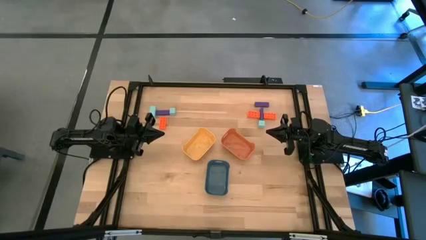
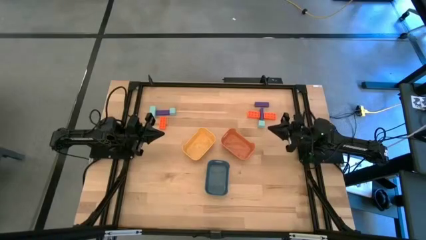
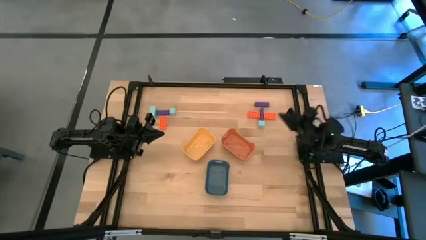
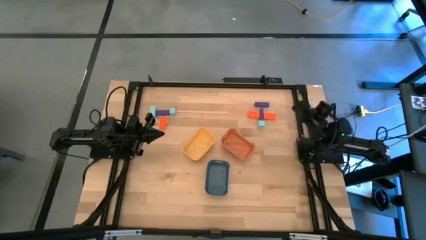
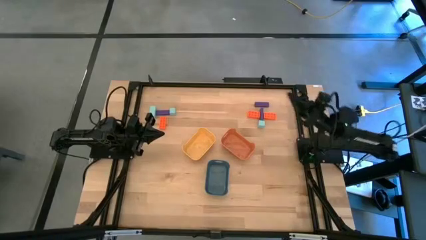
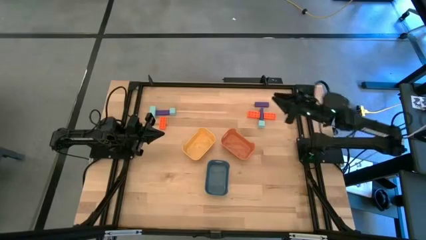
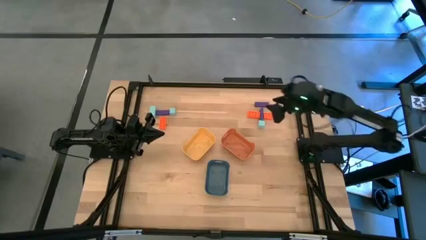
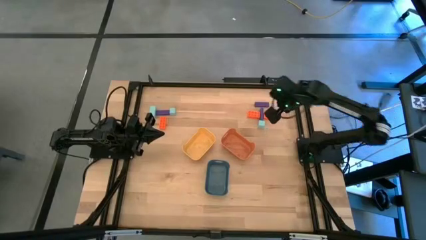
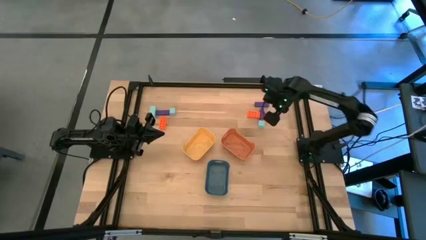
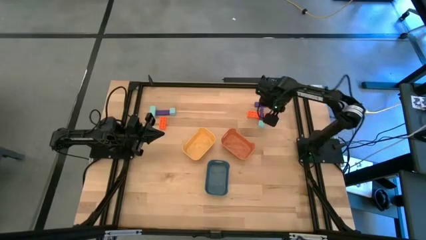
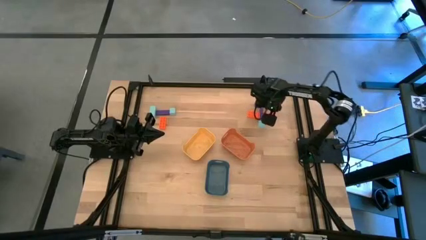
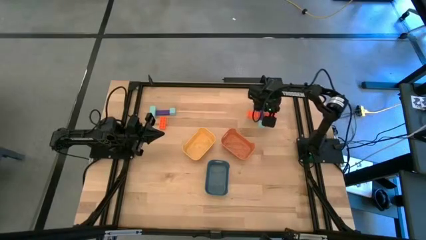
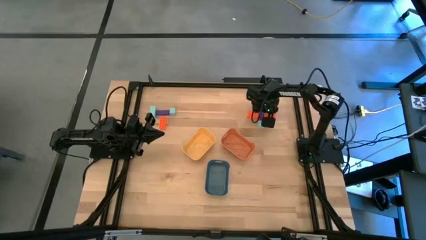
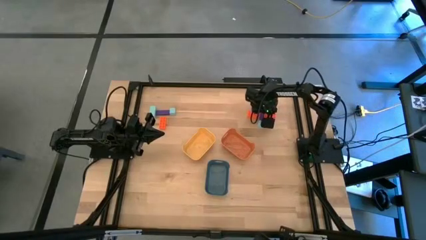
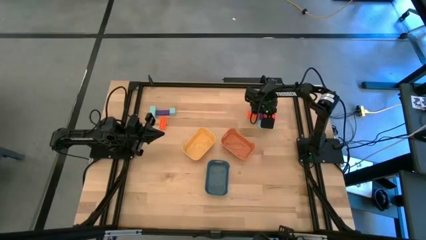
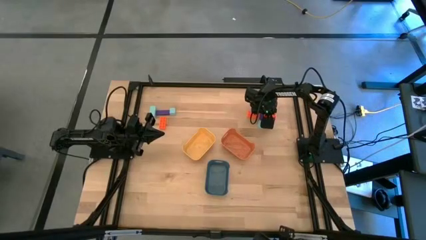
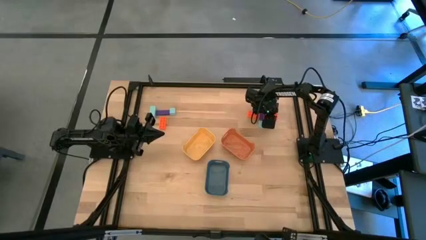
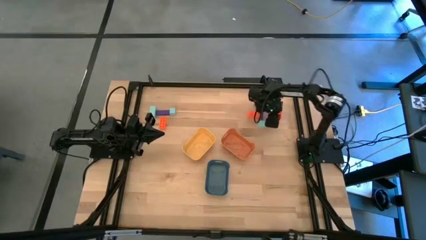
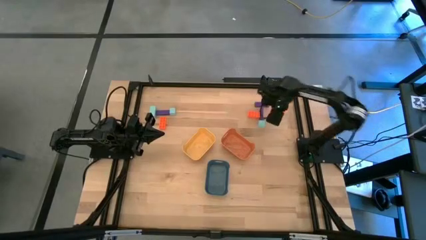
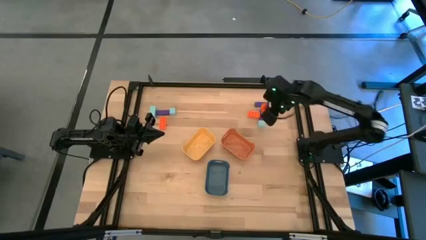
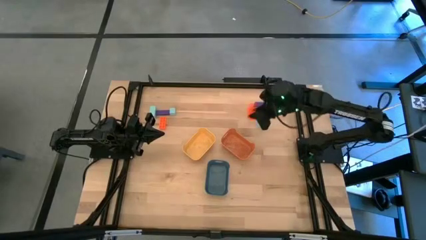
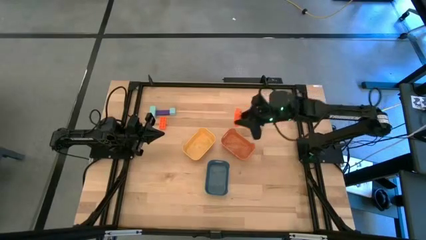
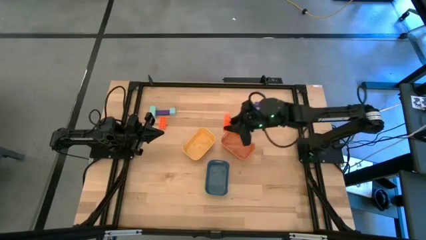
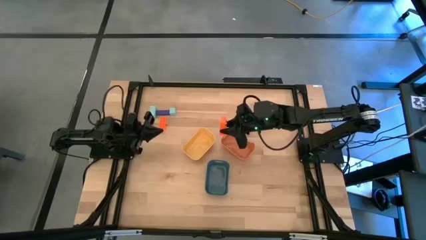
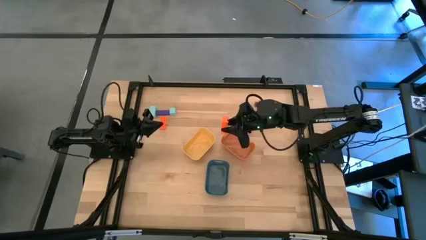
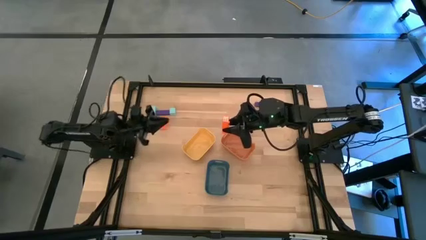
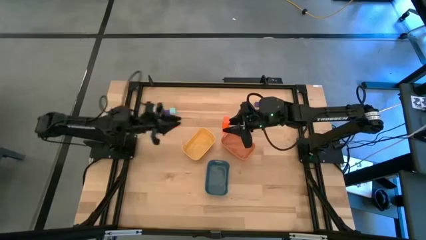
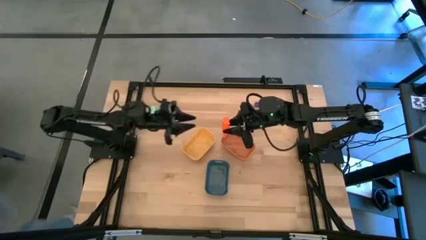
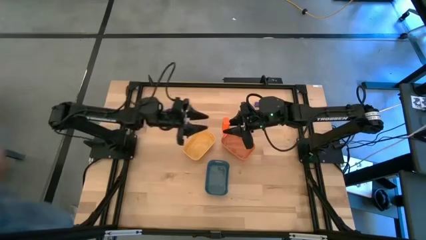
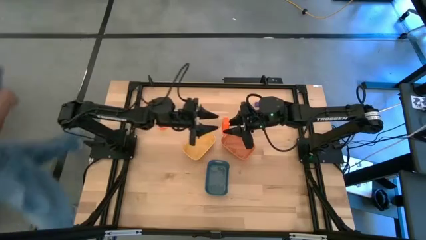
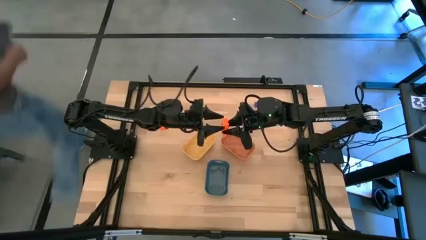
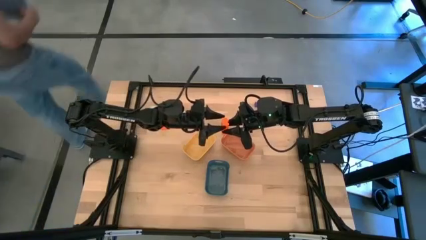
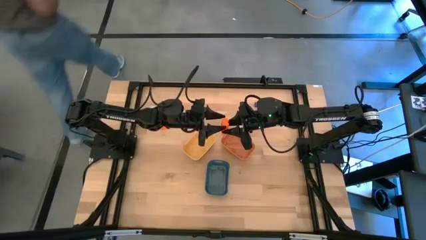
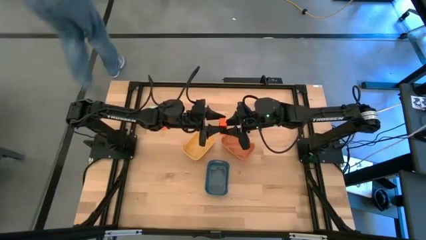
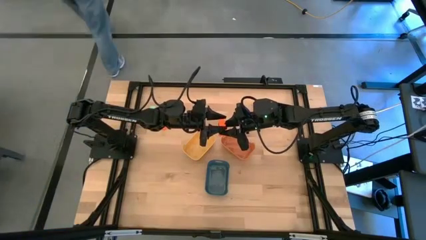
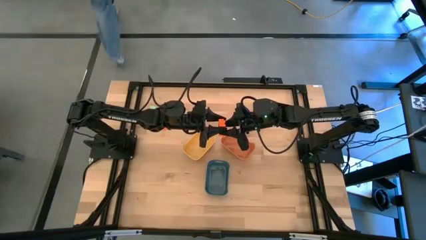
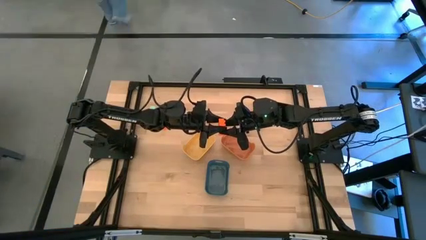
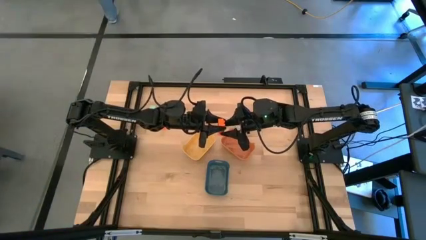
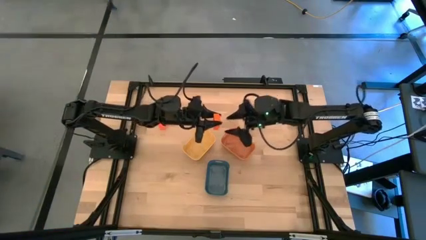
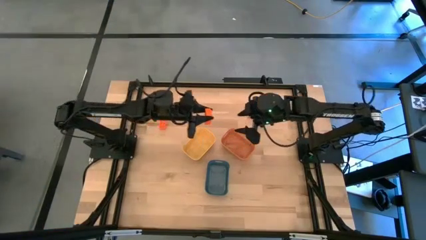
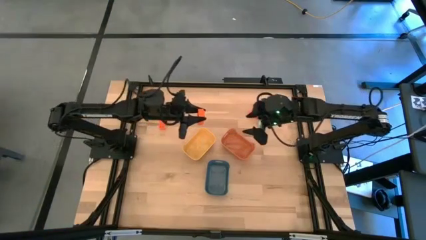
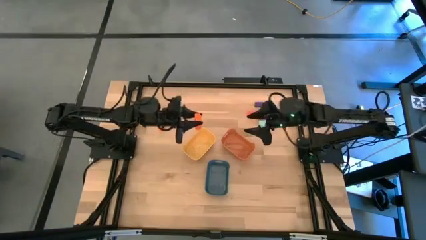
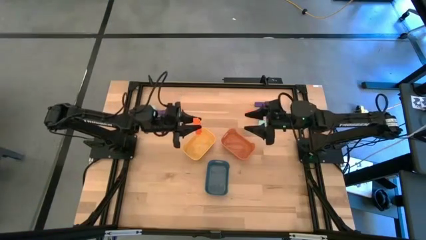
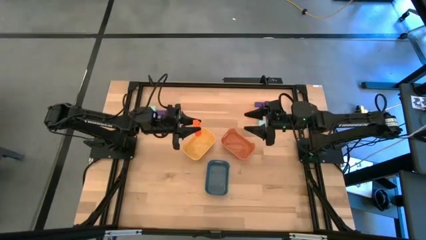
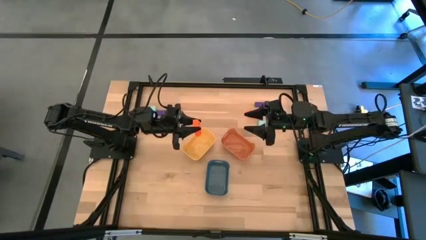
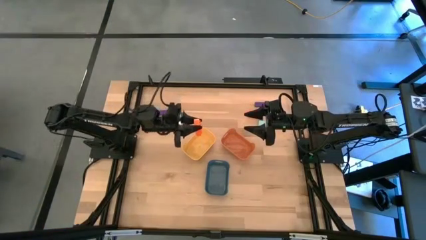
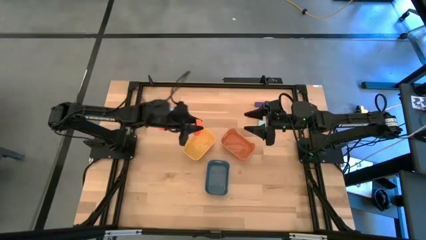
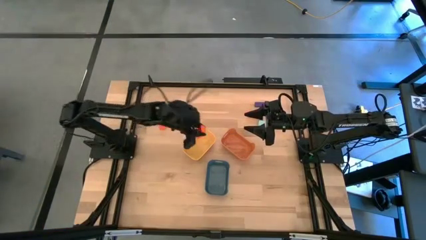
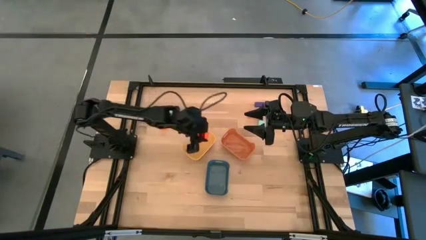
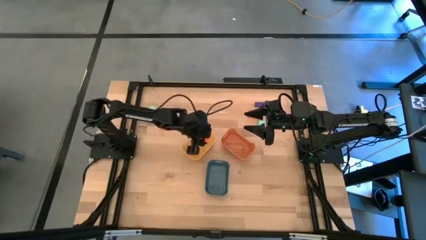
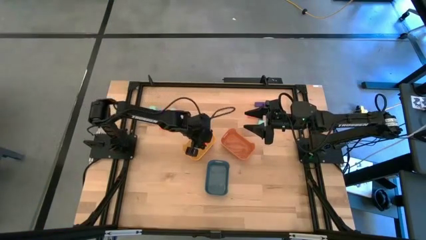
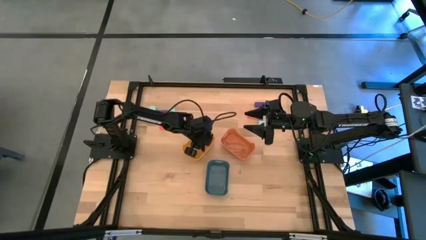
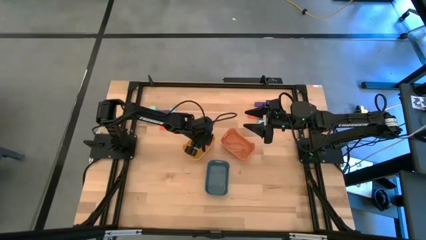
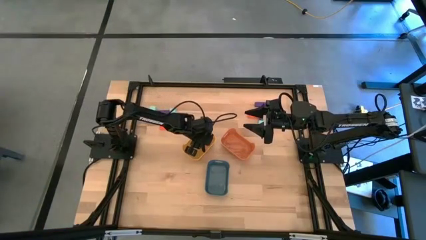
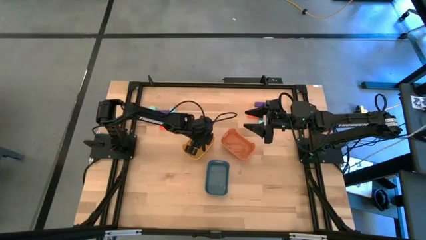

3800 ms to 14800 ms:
Task: Sort & place blocks by color
Put the right orange studded block into the yellow bin

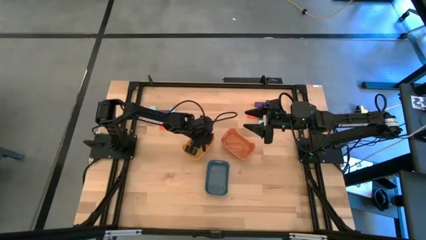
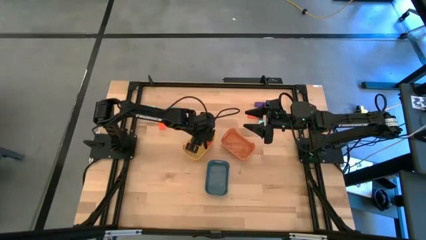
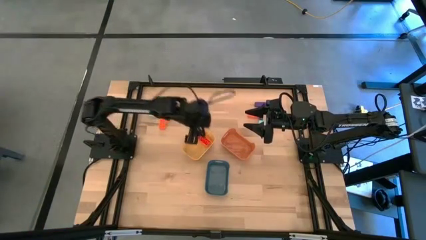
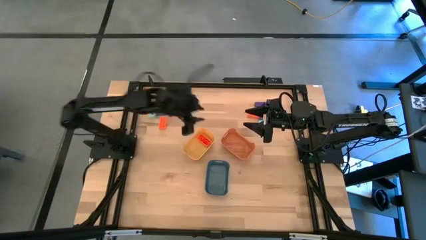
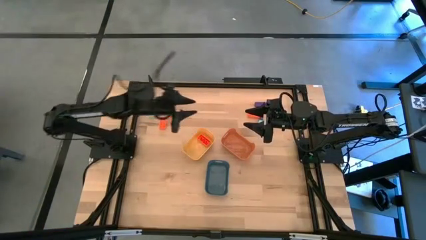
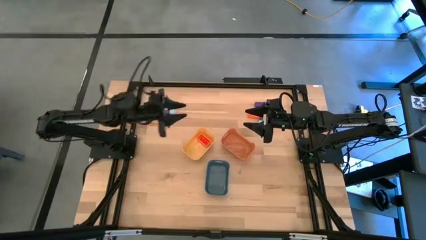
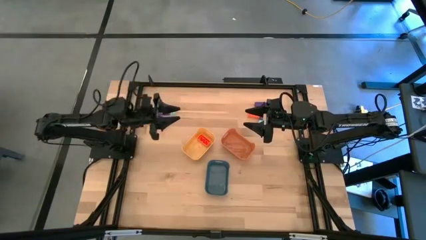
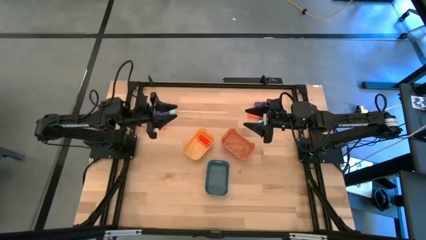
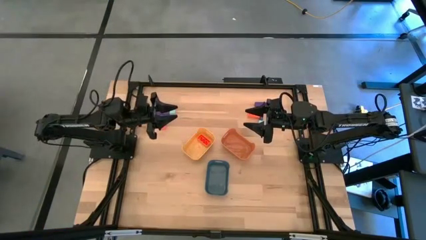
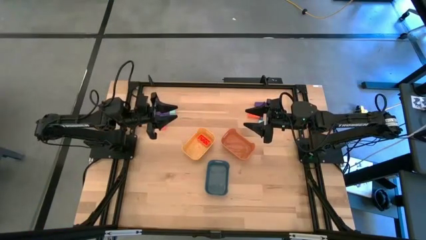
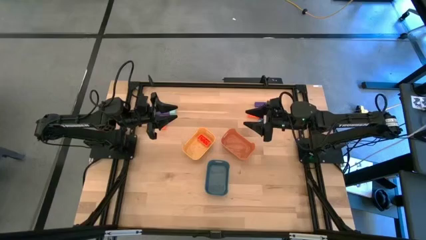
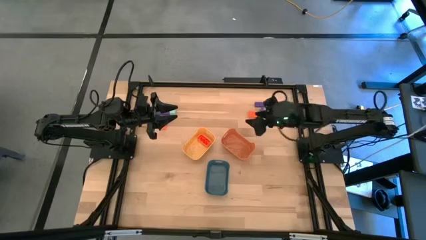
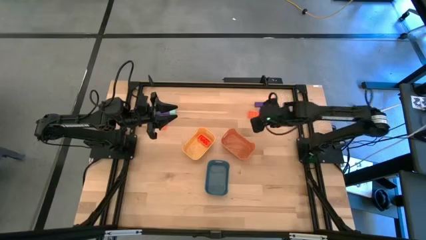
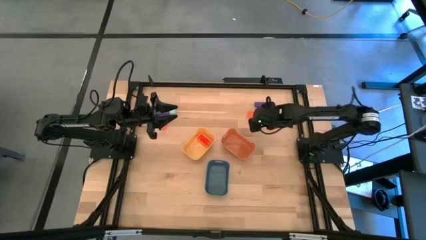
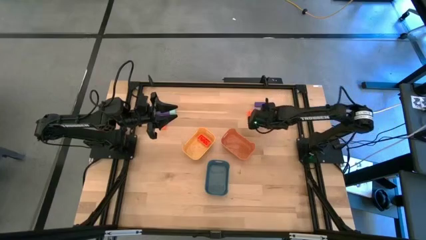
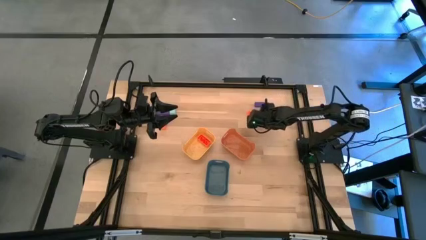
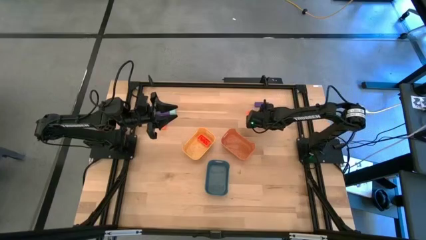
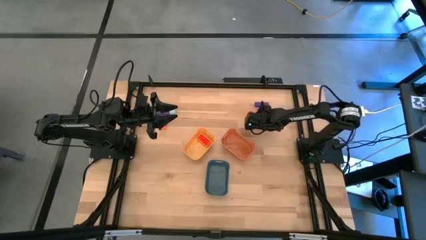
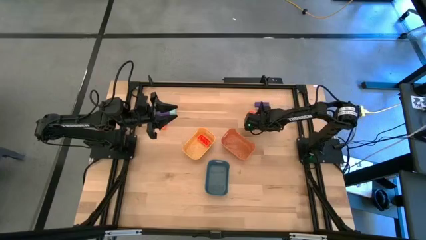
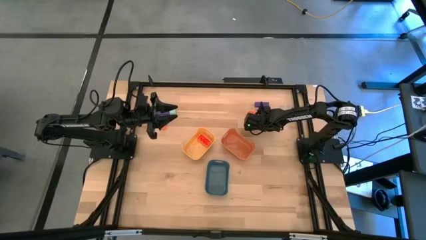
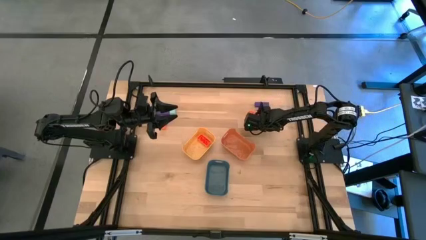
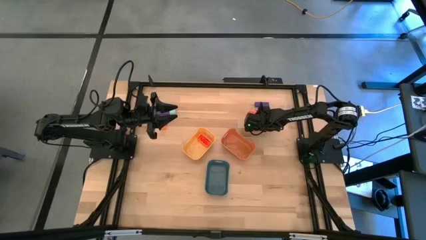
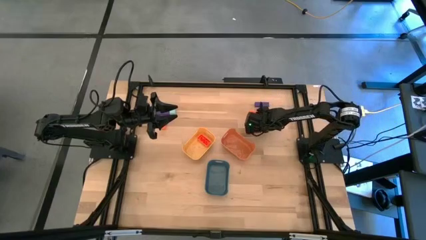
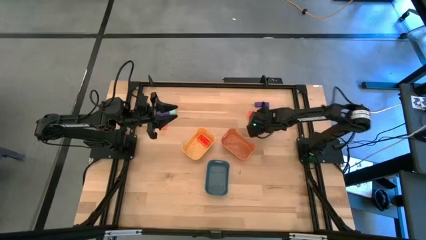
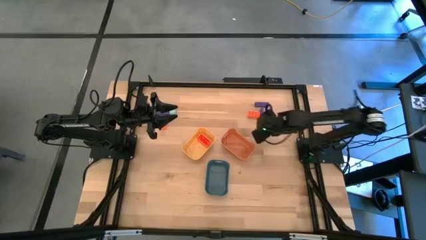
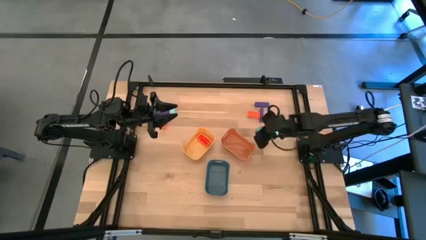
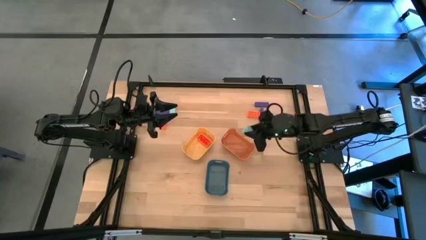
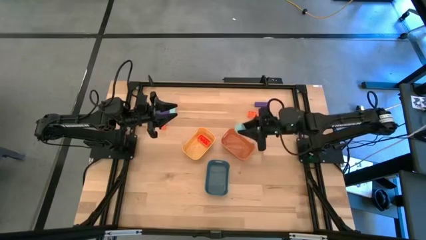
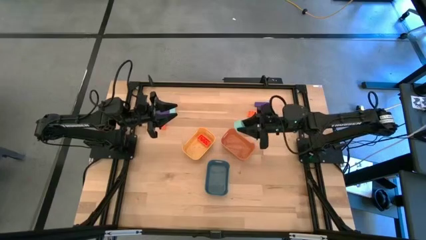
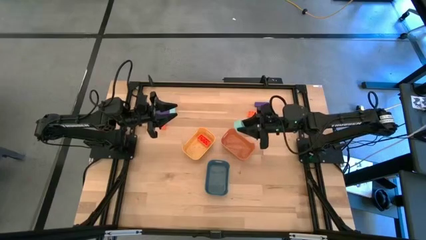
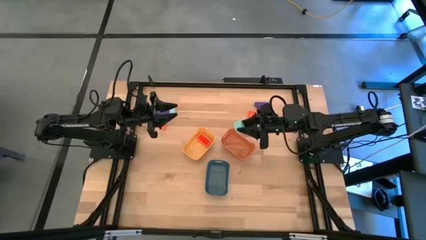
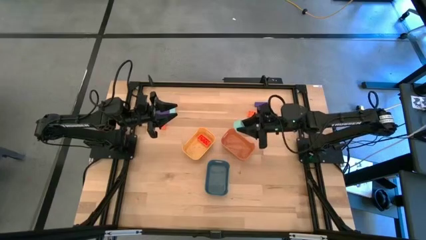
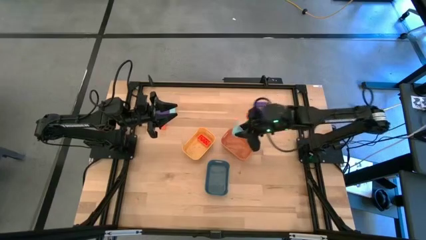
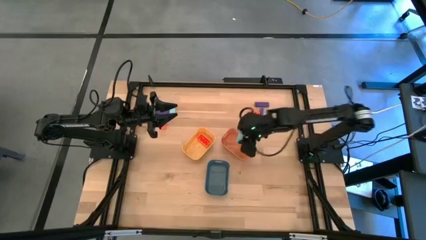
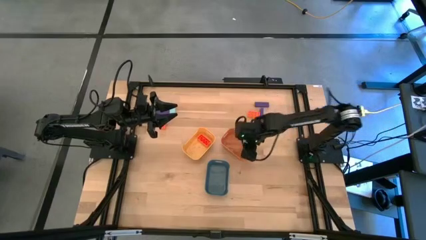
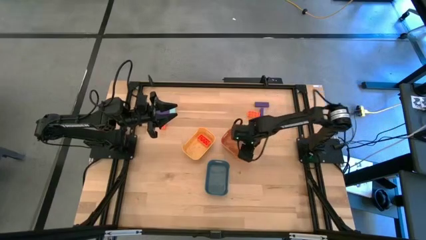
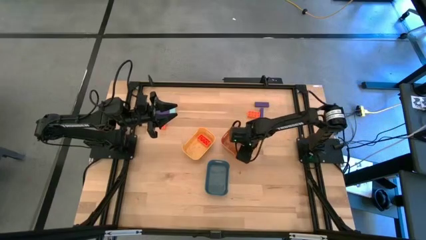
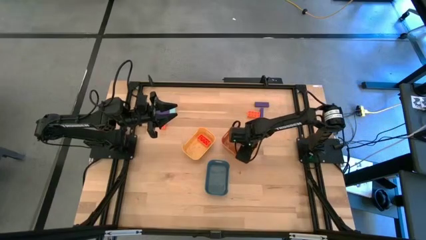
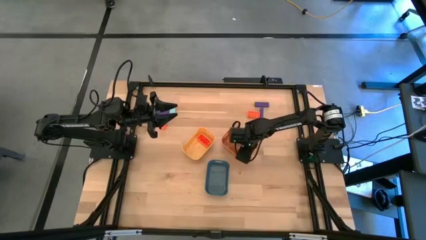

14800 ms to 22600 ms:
Put the right blue block into the orange bin
